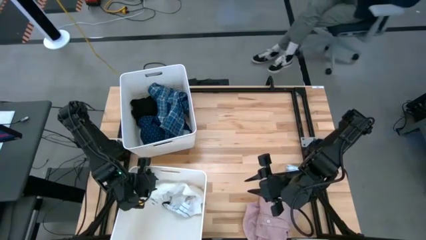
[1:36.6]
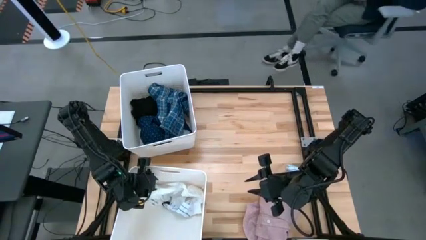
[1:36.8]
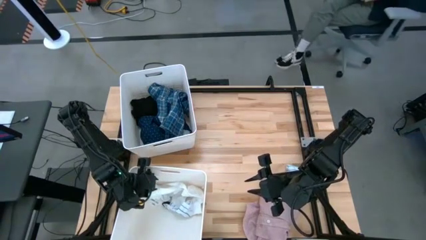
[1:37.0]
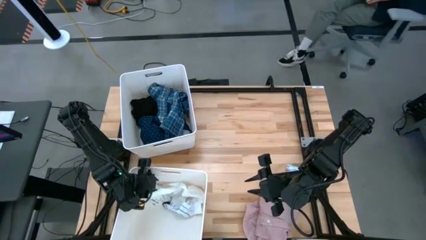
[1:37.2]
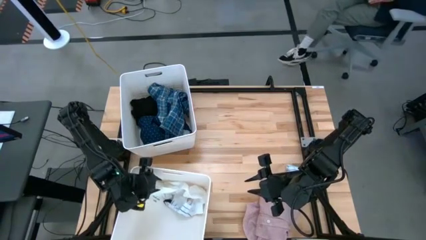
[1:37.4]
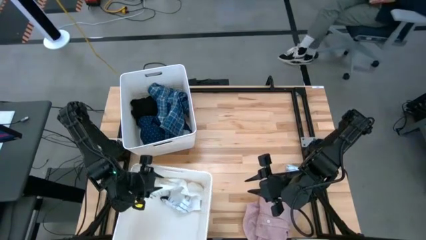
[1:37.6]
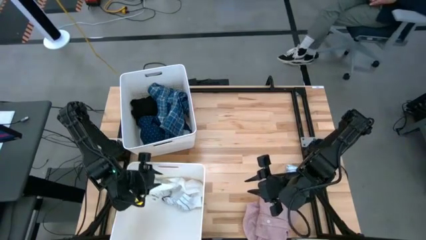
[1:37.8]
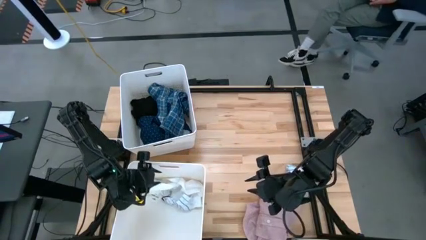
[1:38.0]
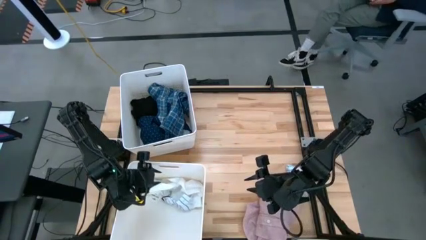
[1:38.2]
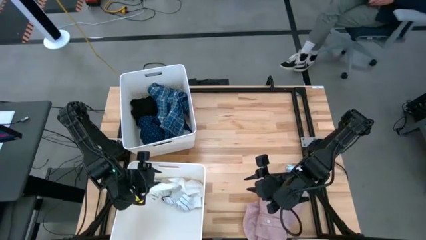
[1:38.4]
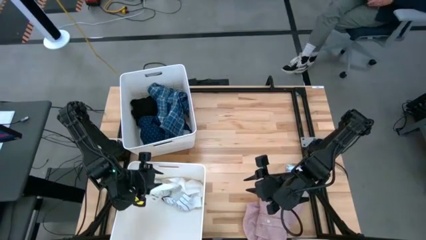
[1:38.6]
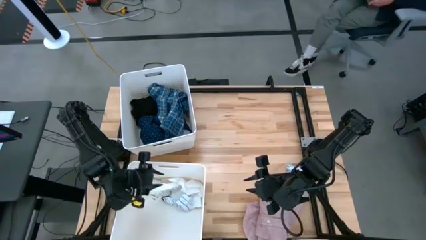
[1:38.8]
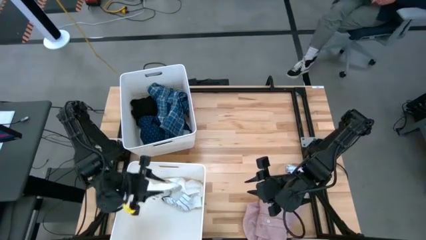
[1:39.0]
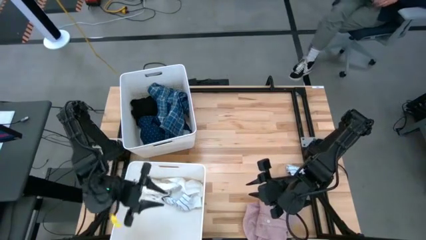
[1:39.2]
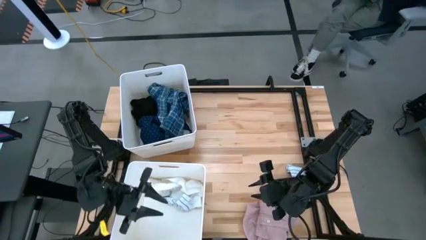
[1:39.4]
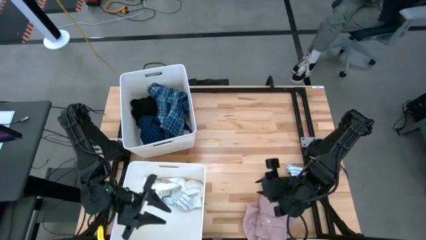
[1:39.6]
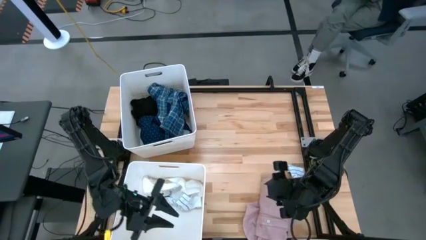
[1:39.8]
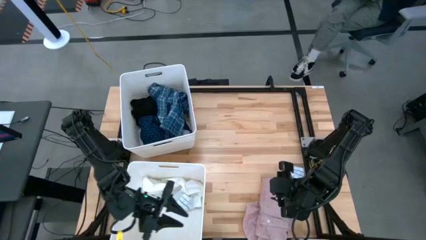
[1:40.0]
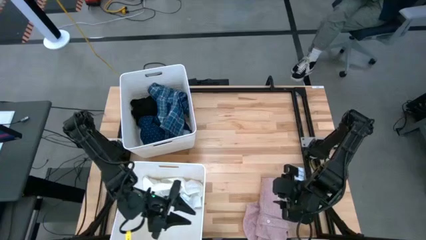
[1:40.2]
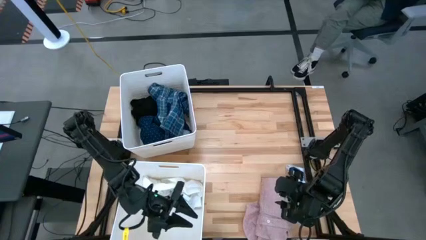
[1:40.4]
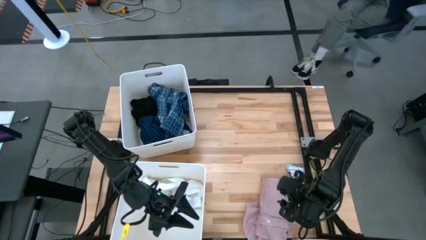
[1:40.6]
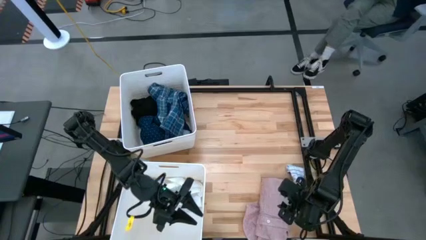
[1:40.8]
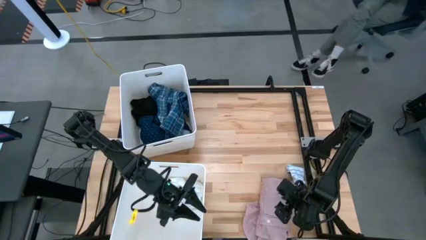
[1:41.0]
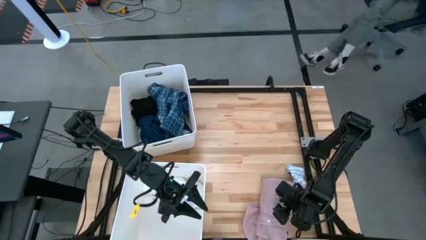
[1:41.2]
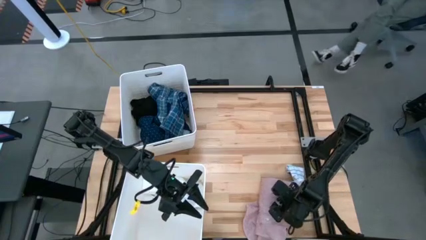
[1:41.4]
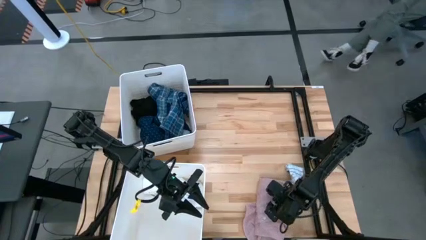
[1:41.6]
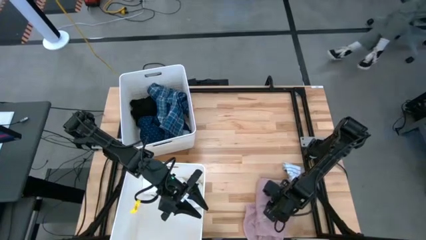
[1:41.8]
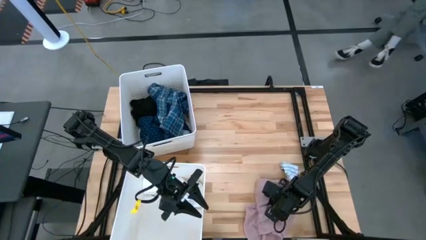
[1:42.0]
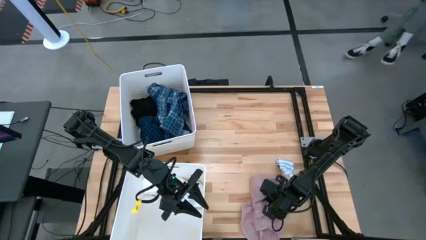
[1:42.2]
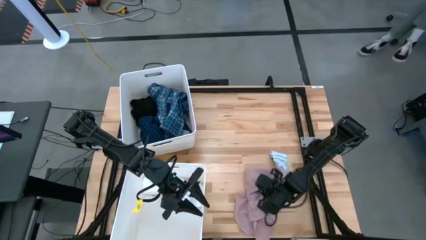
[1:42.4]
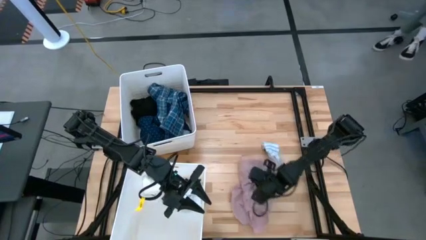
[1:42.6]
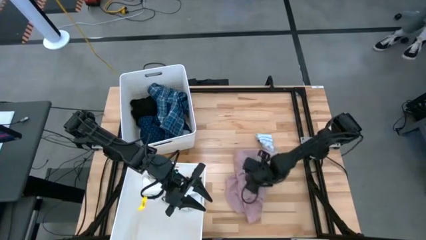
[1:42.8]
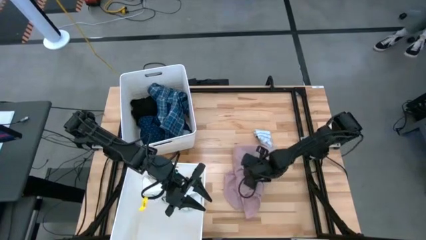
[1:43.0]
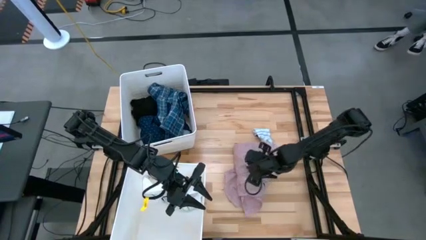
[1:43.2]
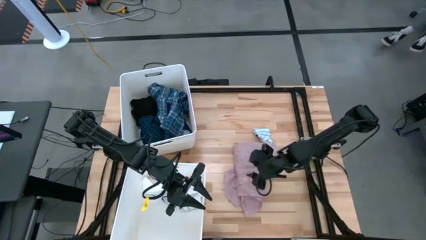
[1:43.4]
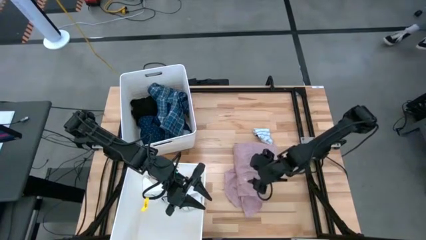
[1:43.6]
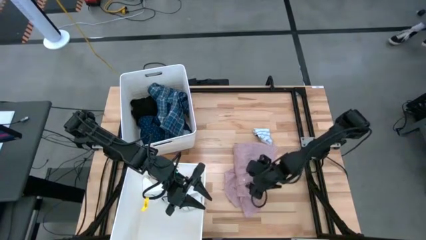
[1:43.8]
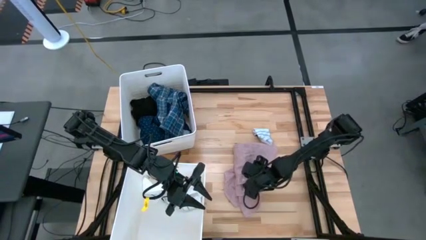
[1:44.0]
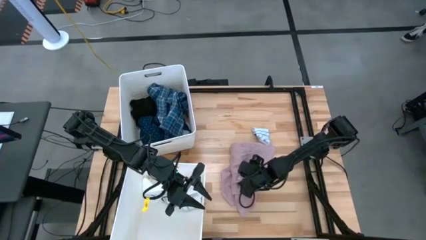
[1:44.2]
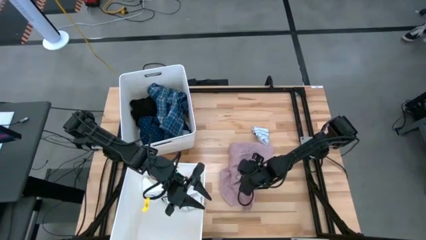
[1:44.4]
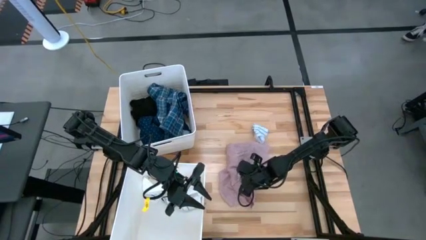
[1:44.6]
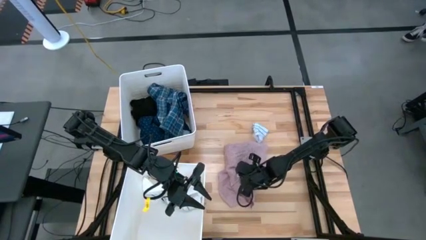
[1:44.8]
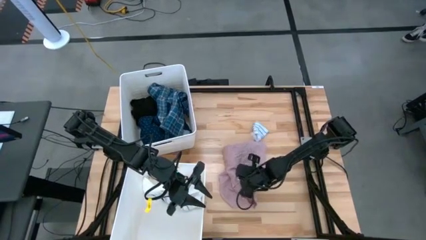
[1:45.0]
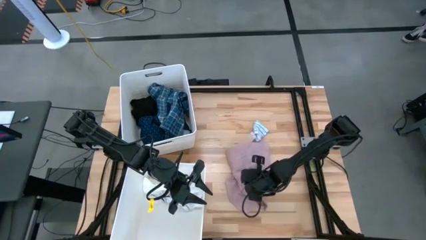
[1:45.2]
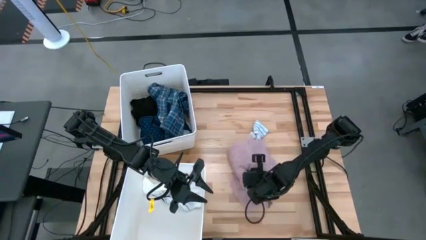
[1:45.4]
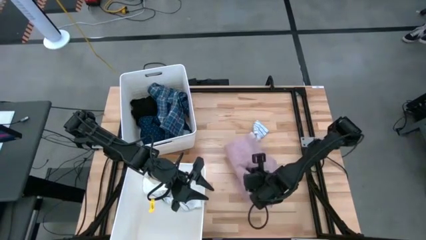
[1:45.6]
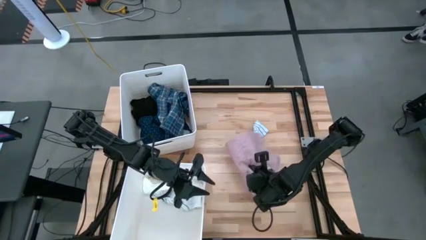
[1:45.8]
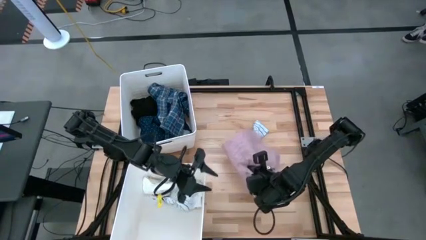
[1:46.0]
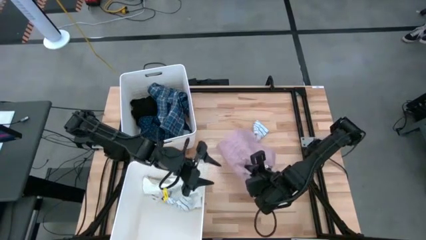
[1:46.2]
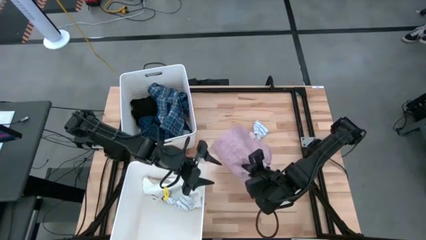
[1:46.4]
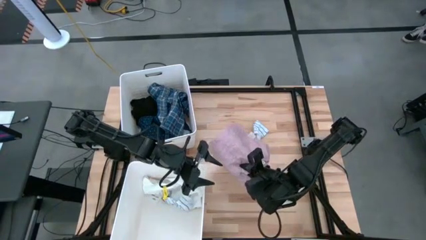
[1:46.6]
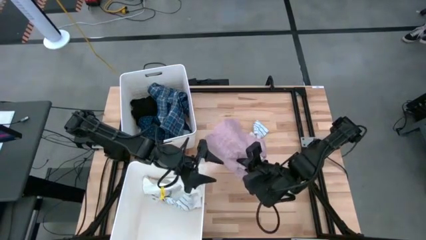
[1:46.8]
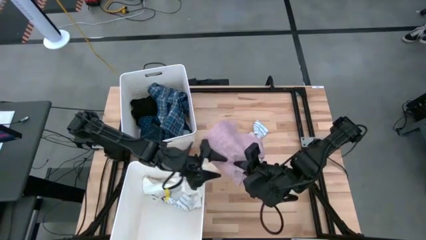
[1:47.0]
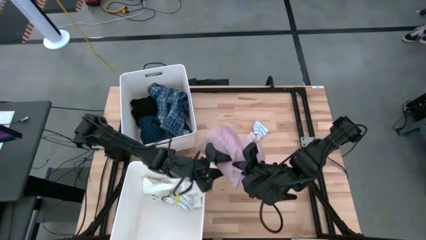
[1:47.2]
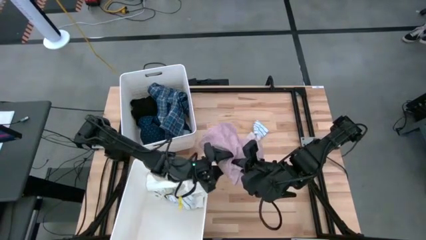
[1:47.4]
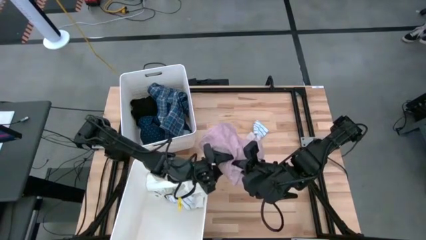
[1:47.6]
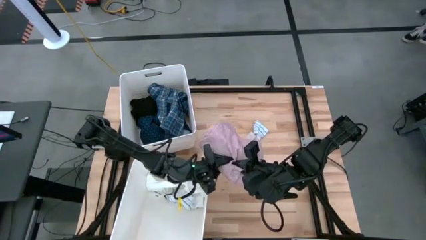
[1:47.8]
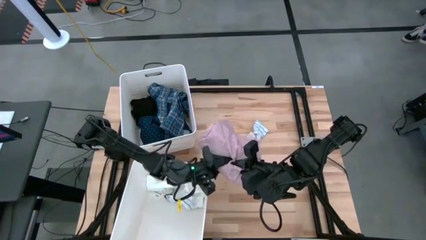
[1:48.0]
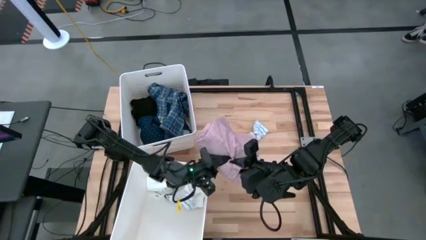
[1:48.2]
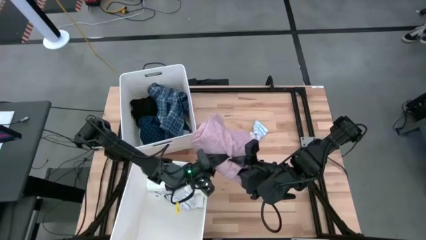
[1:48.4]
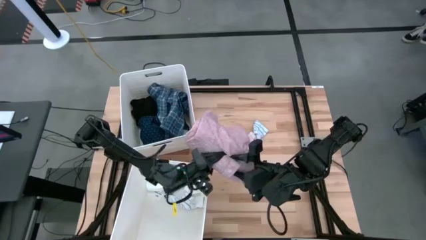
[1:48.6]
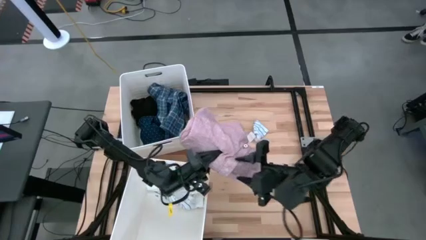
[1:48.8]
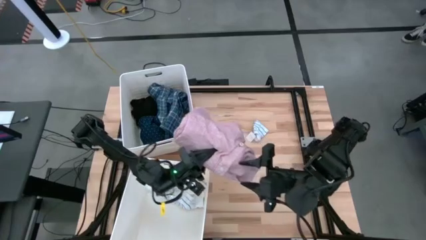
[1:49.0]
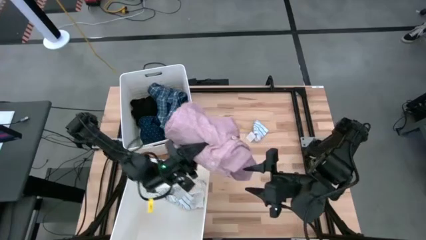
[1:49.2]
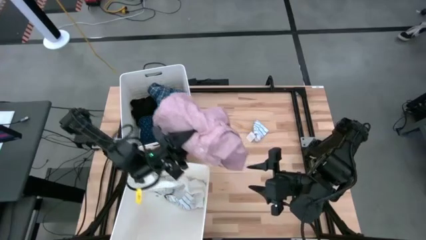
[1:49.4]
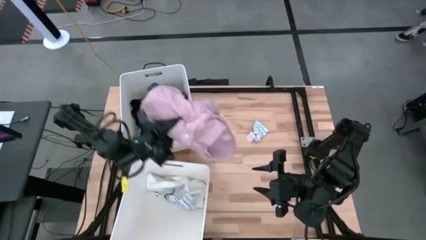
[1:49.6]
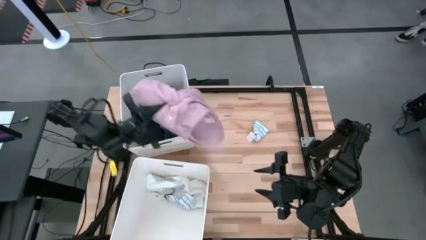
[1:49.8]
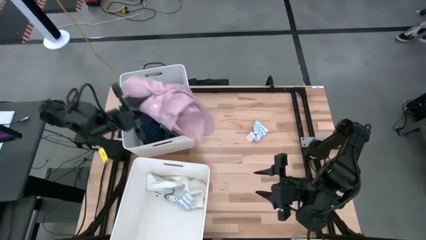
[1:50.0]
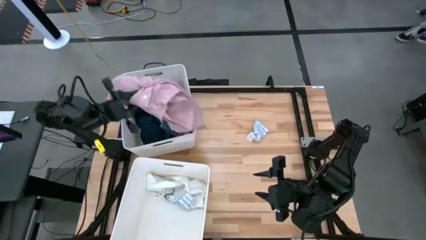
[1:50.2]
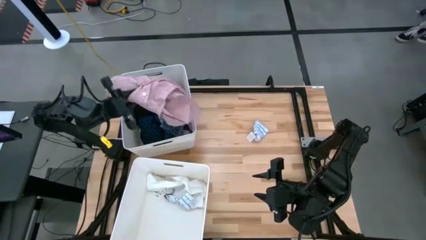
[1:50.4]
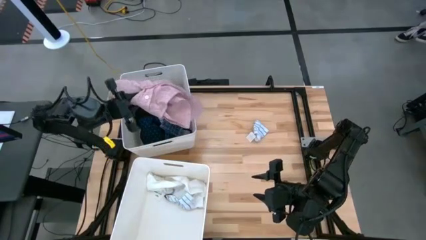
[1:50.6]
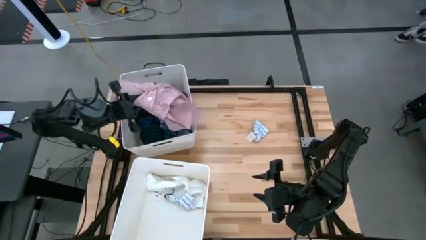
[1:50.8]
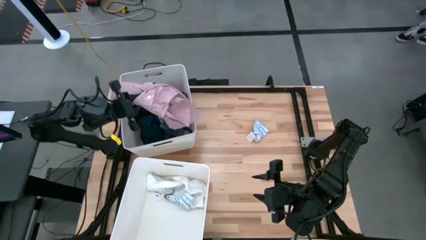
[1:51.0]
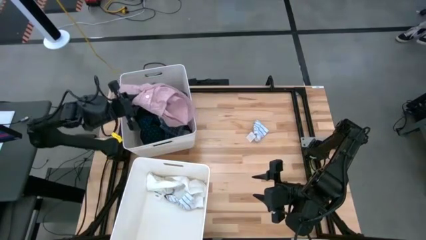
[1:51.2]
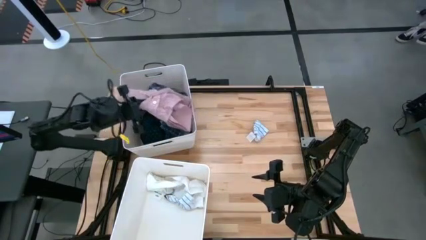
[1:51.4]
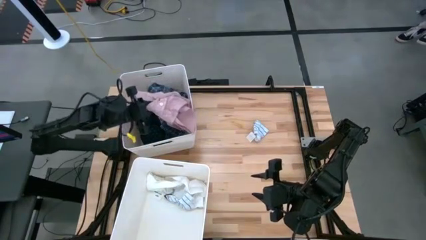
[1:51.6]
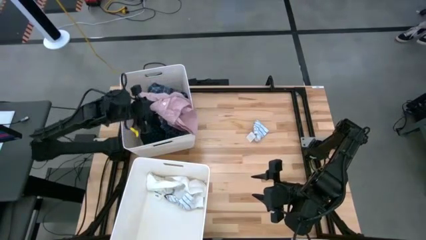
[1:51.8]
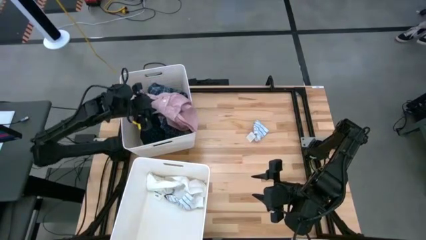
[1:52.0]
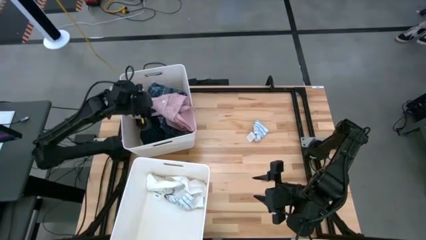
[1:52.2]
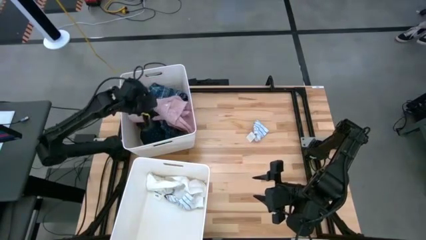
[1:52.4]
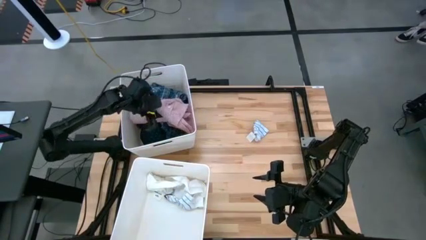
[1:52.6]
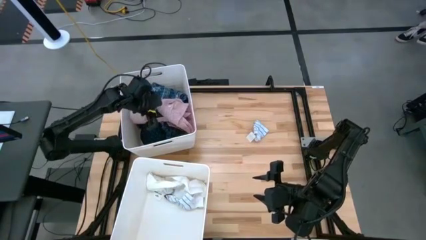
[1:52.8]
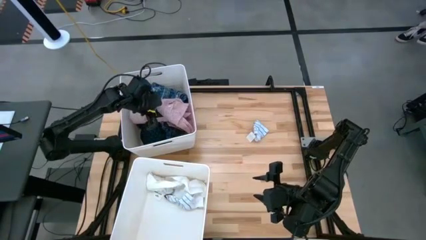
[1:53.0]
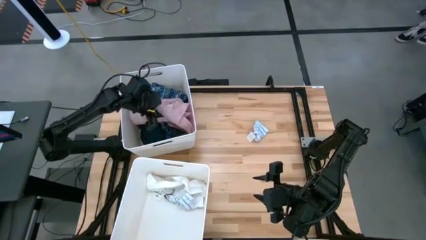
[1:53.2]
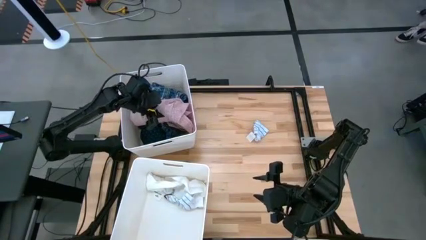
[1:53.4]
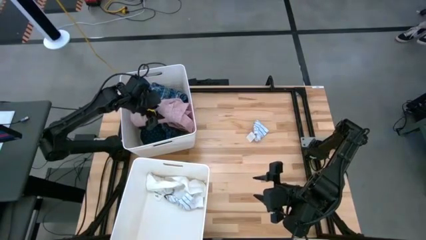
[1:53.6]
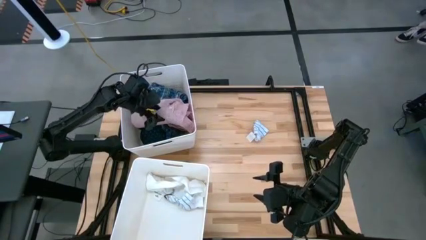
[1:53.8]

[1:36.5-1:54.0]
Task: Sort clothes
Put the pink shirt into the top white laundry organizer
